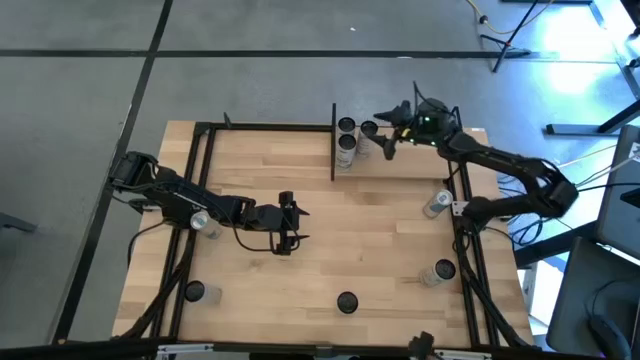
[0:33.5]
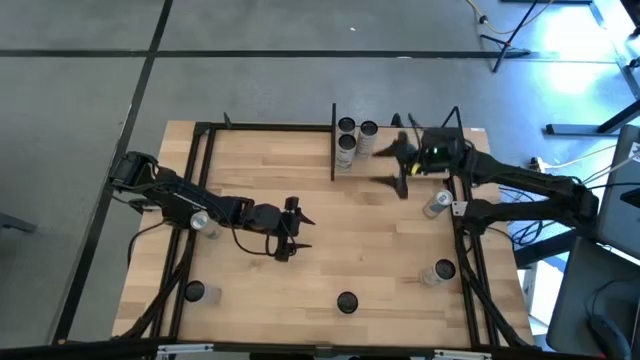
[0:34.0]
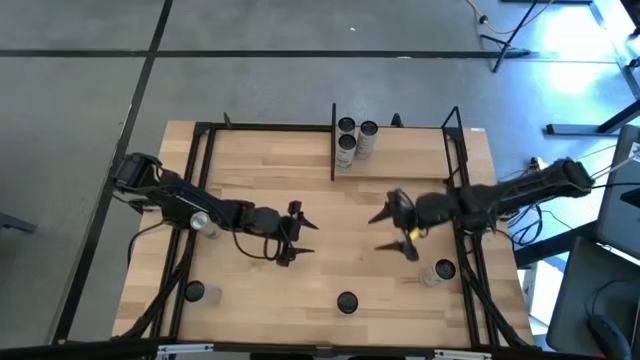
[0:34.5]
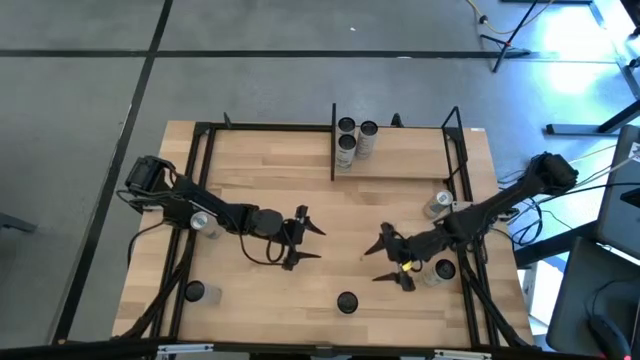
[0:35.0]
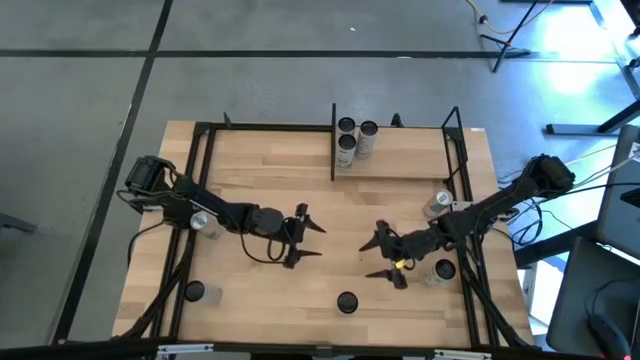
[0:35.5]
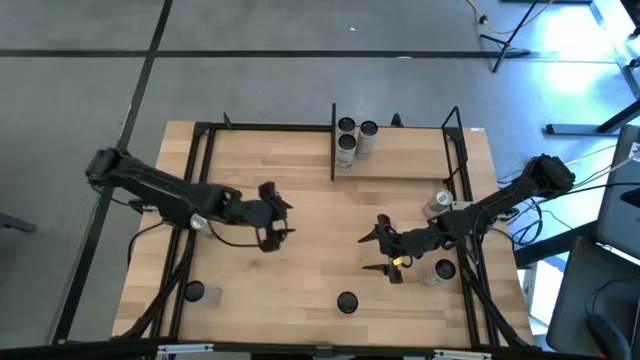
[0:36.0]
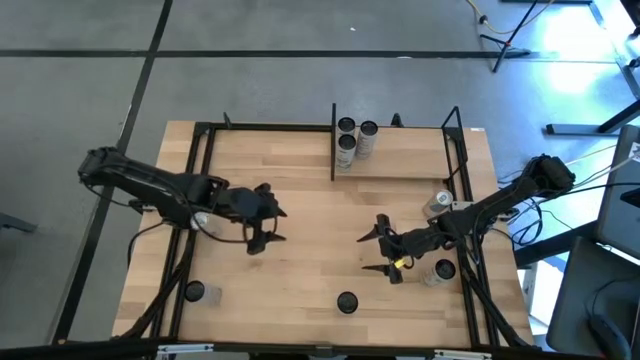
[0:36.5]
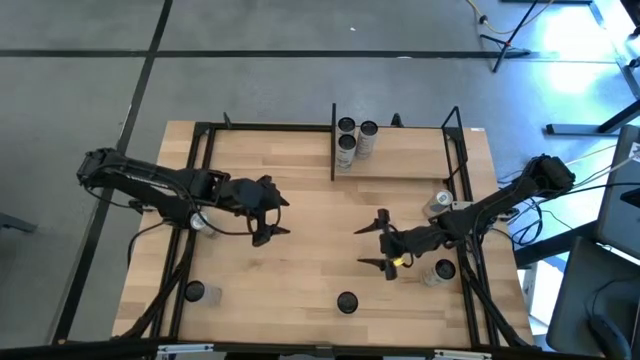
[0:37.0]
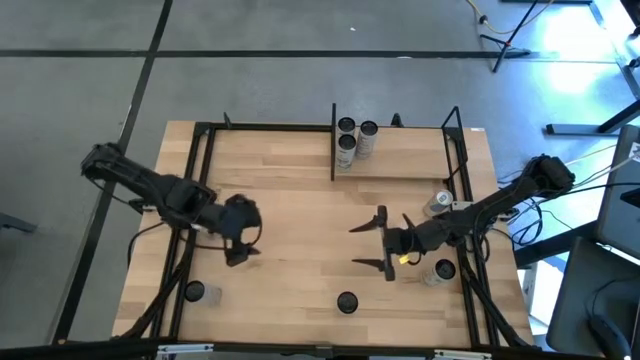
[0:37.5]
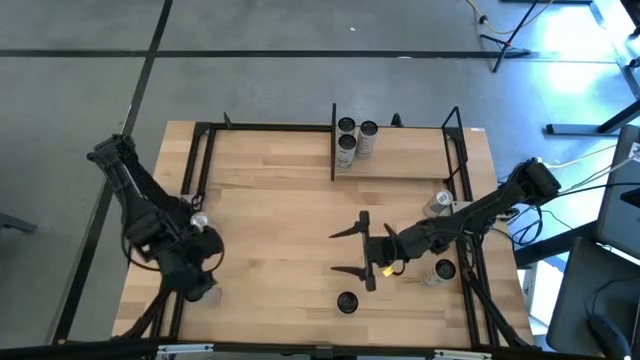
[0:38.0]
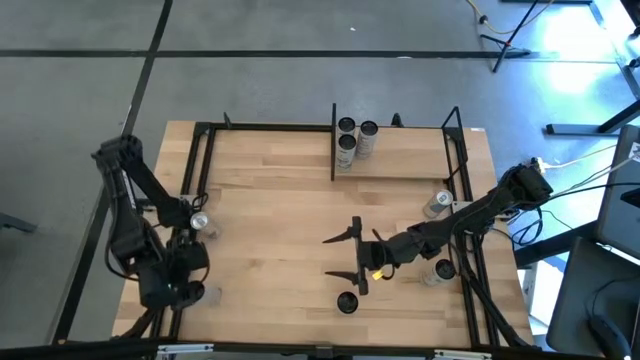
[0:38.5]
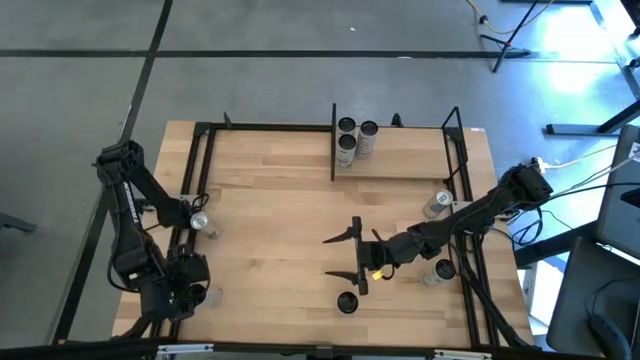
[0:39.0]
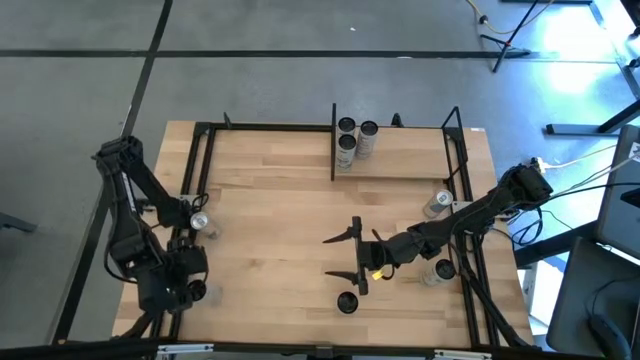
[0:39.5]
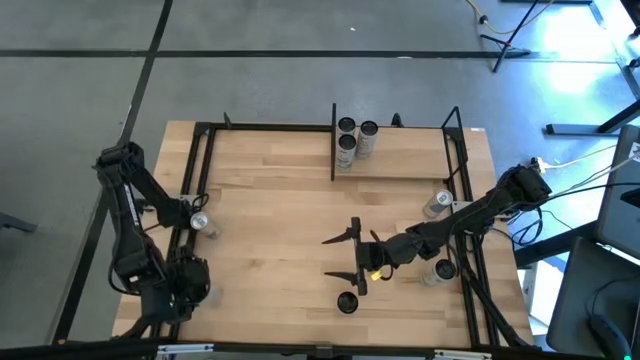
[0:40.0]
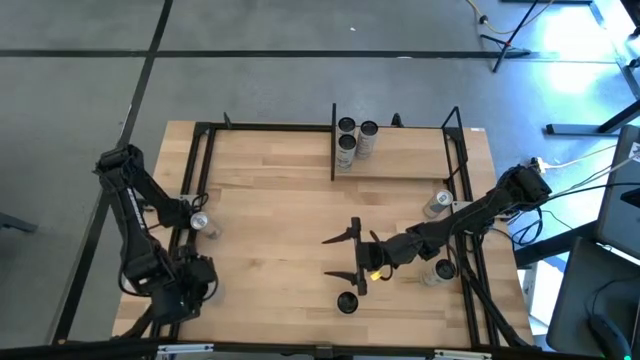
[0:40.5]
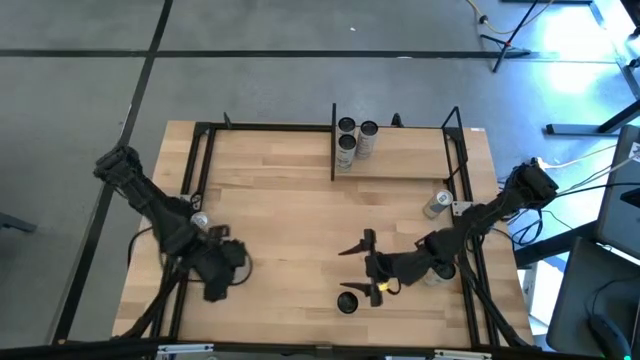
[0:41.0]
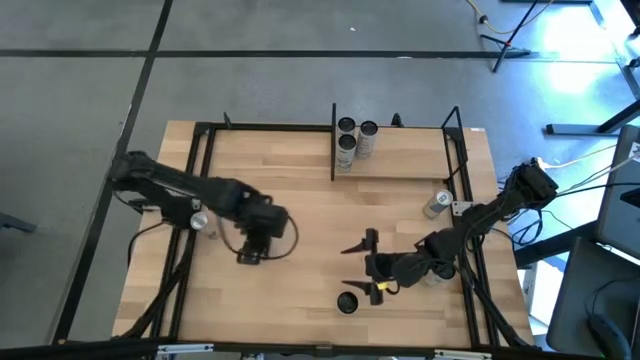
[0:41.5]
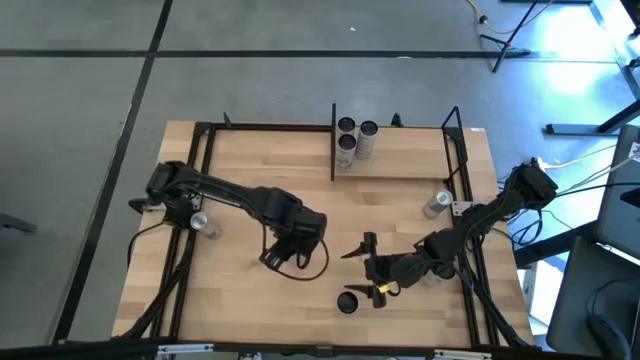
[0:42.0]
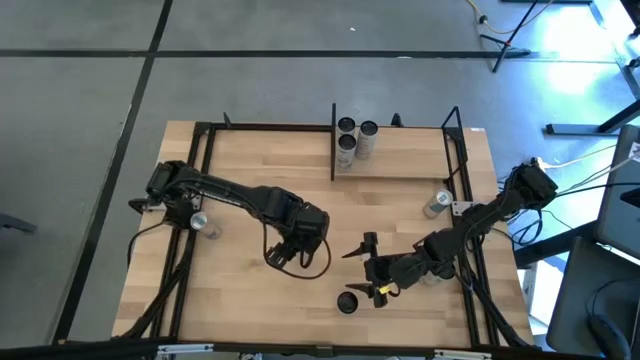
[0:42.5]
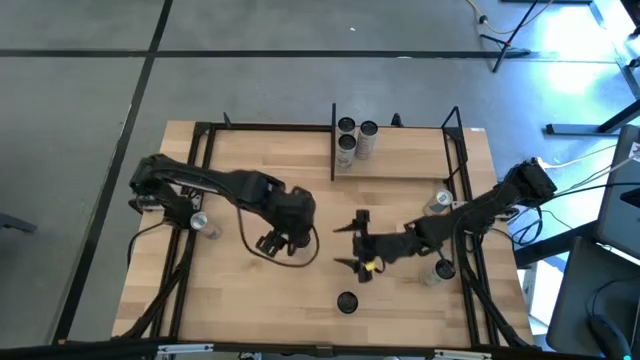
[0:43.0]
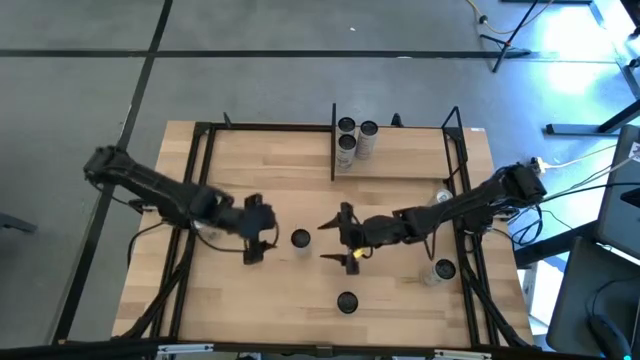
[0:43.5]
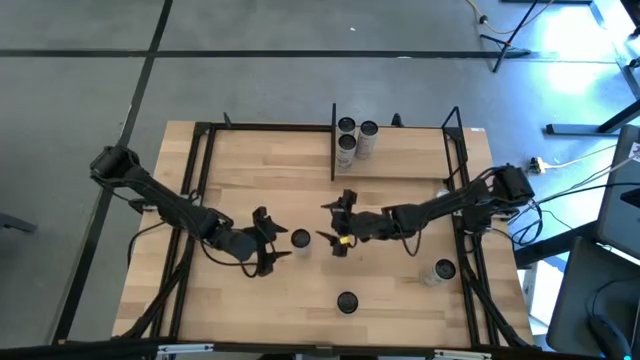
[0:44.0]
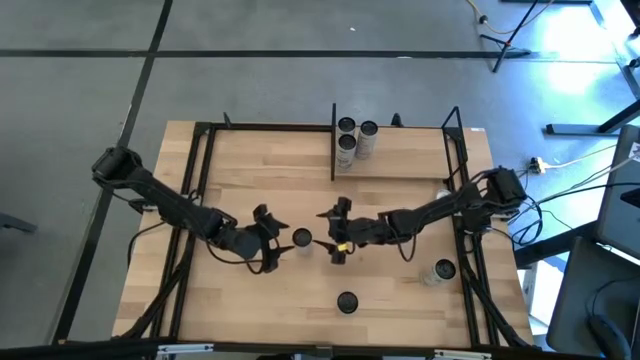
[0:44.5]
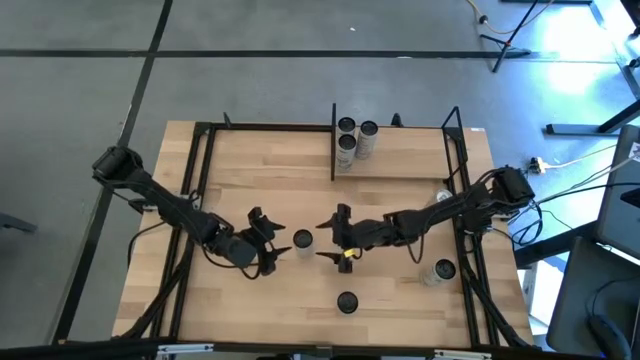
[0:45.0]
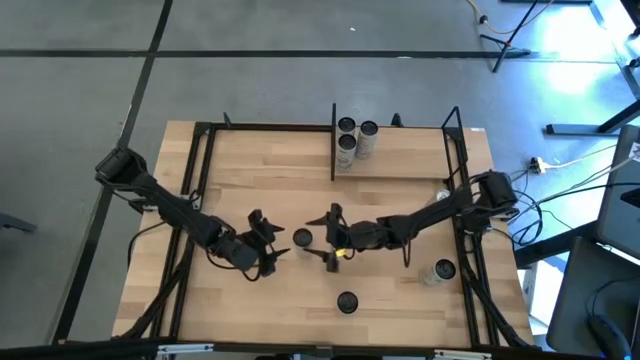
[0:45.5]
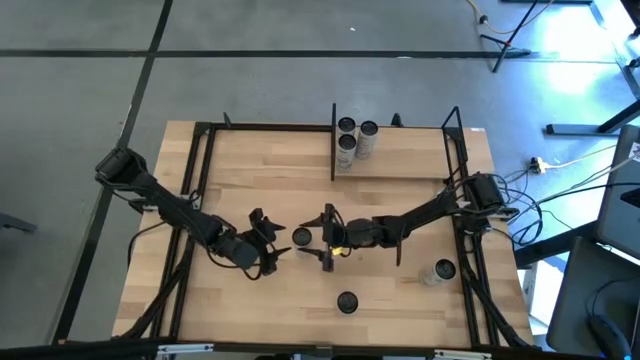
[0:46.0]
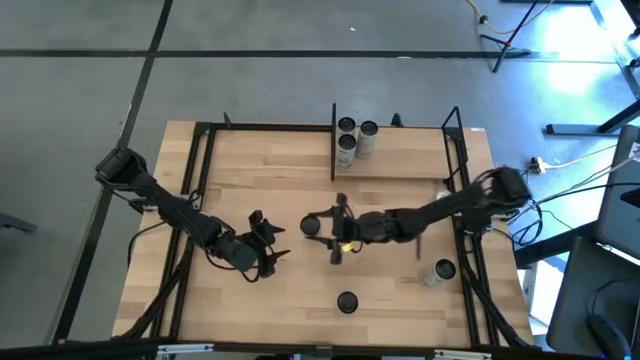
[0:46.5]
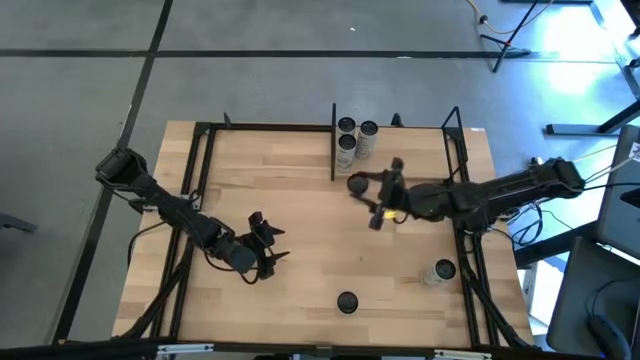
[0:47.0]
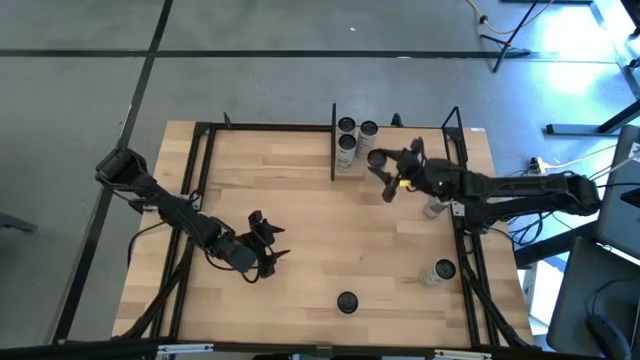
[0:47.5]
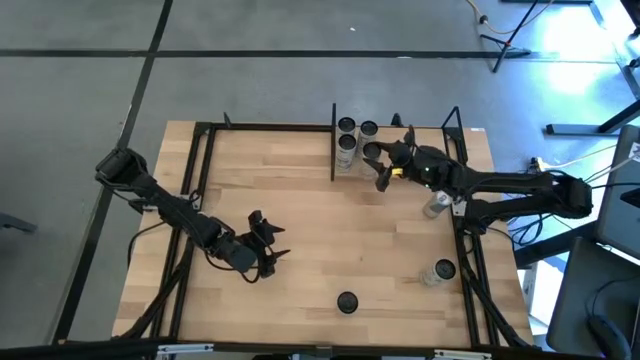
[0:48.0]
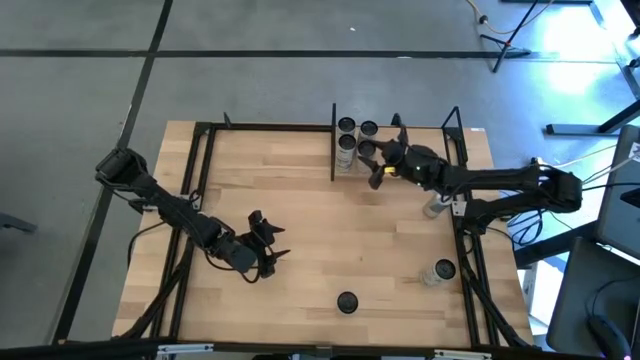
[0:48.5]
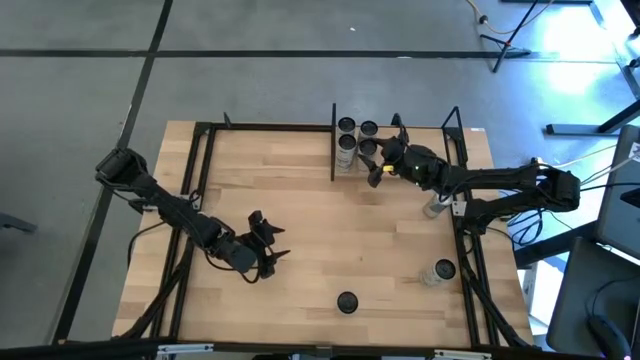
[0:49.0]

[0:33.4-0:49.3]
Task: Place canned beverage on shelf
Put the white-yellow soda can aligned with the other white-yellow soda can on the shelf

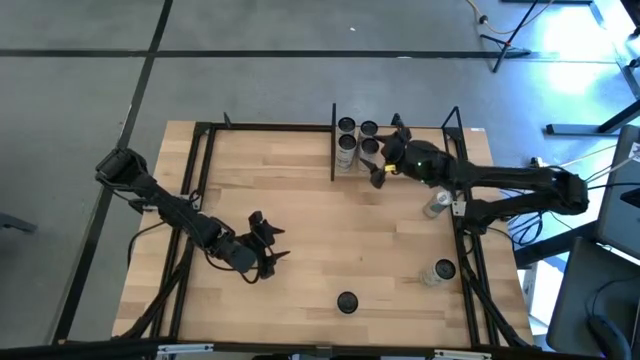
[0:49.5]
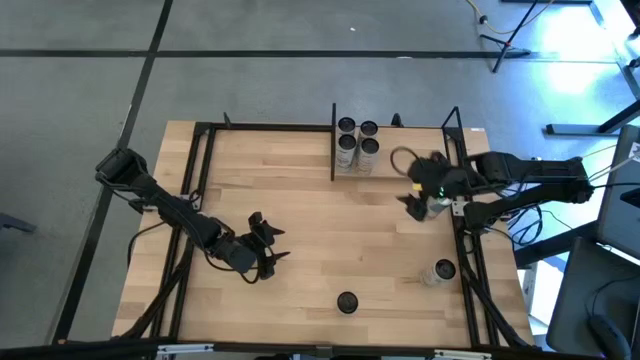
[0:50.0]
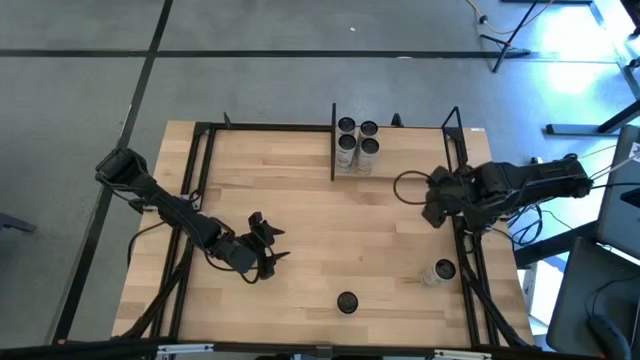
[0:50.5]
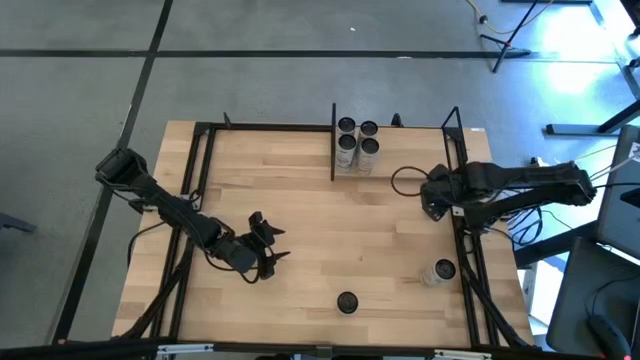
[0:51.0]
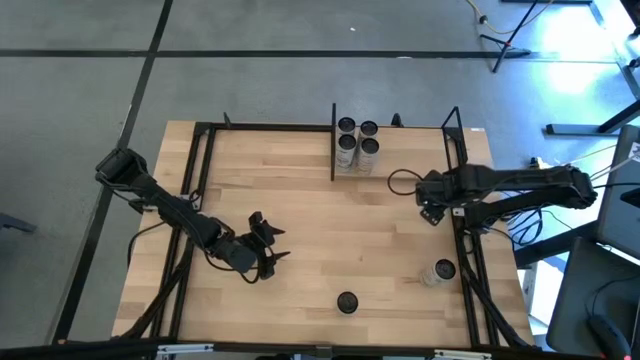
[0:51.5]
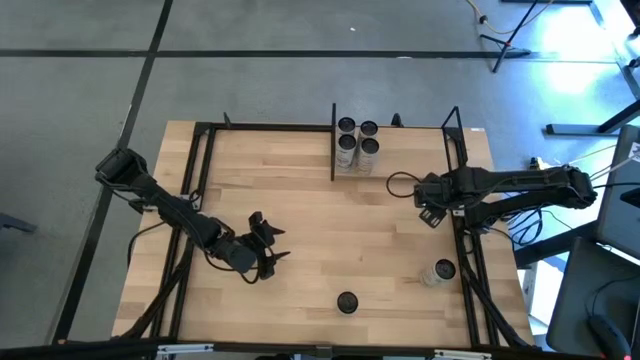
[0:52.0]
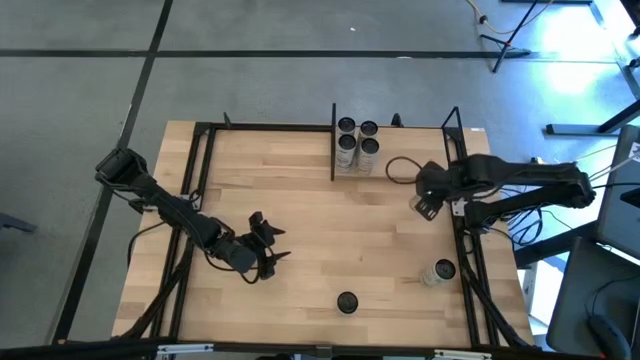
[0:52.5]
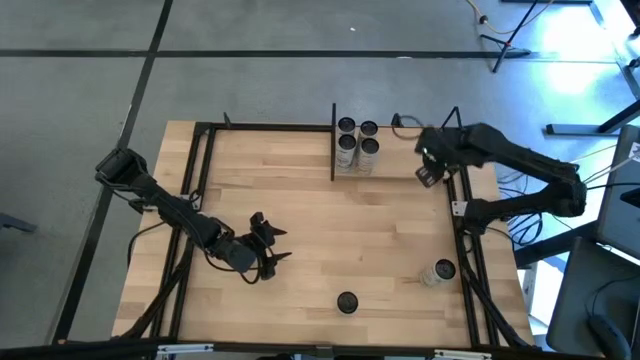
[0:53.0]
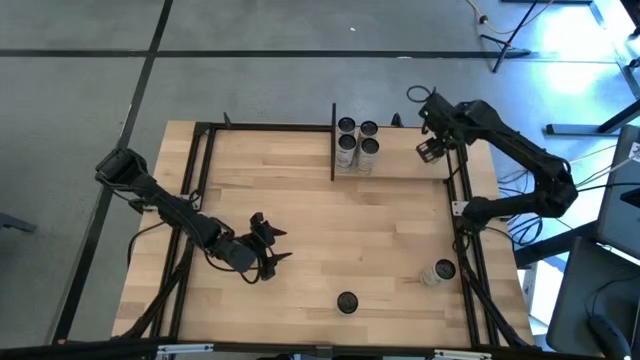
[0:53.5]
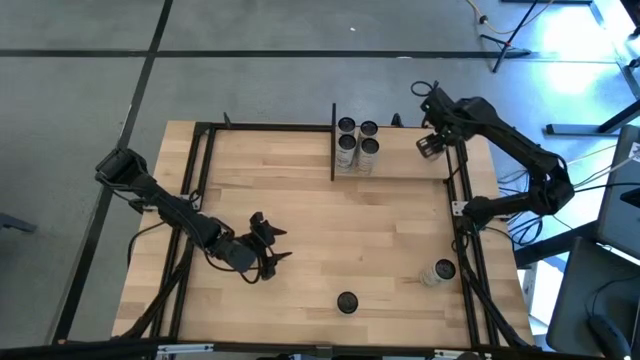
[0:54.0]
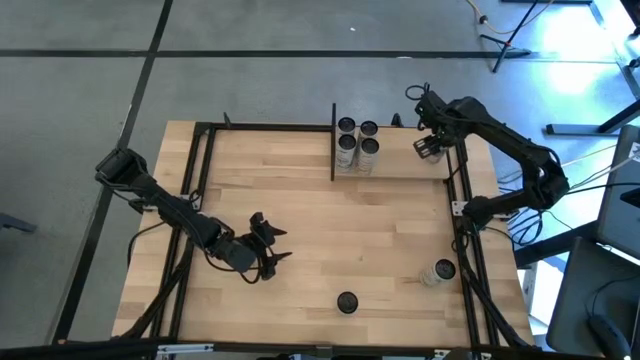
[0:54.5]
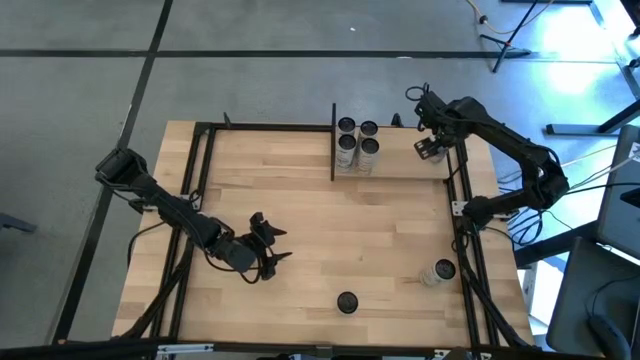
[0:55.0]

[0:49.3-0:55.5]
Put the top blue soda can on the shelf
